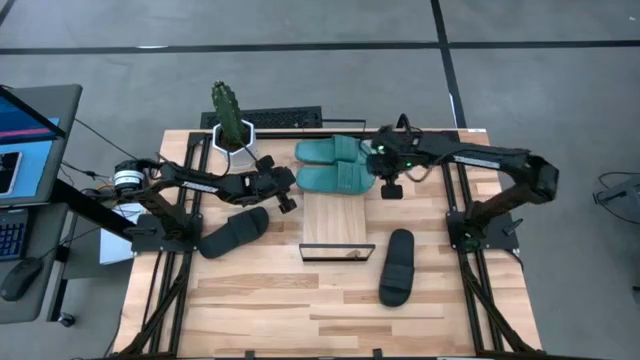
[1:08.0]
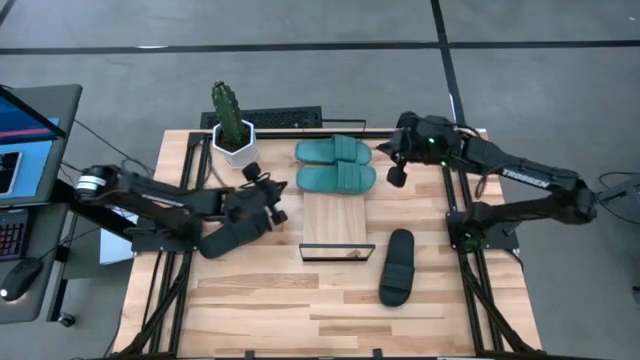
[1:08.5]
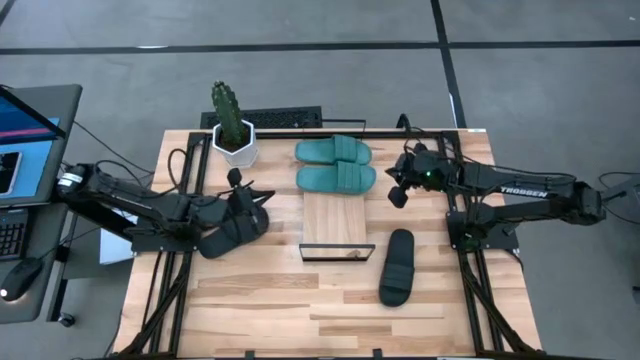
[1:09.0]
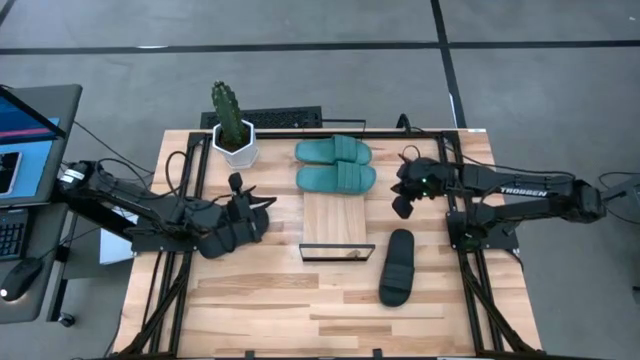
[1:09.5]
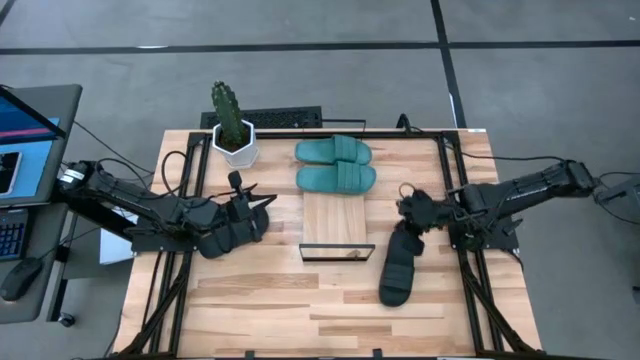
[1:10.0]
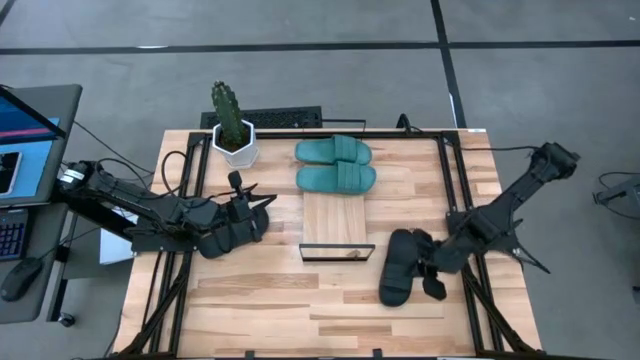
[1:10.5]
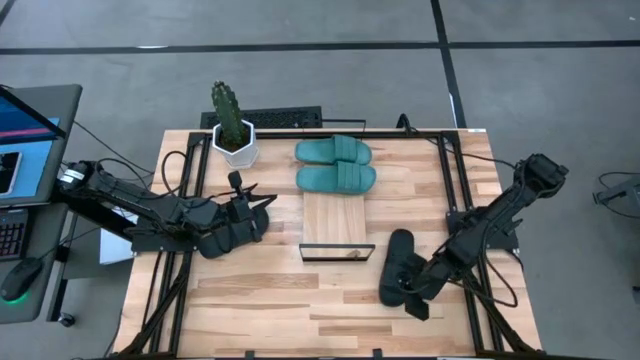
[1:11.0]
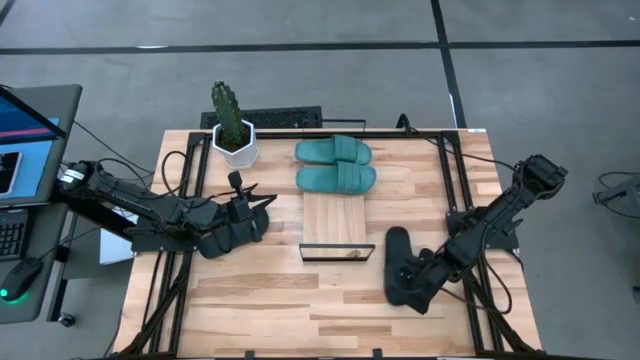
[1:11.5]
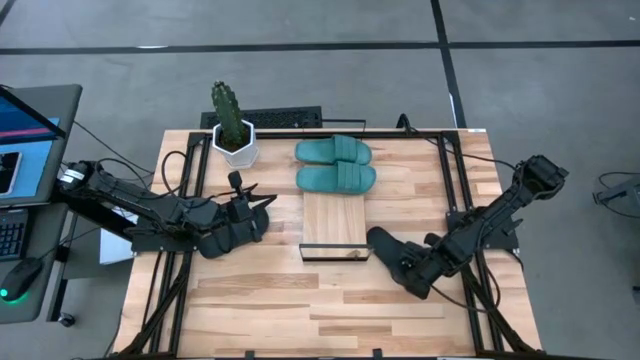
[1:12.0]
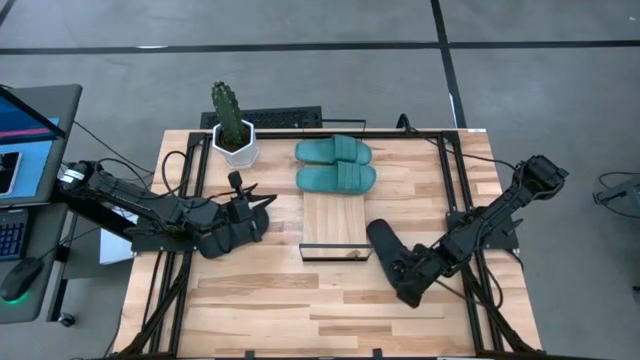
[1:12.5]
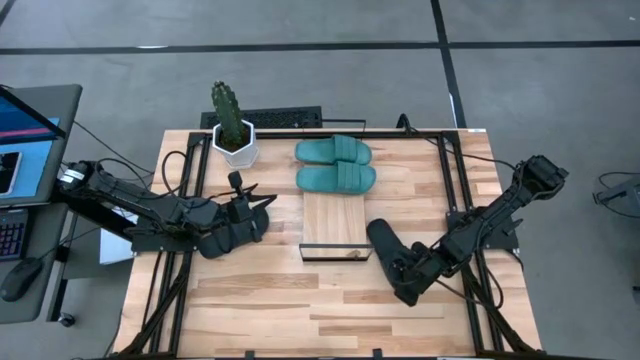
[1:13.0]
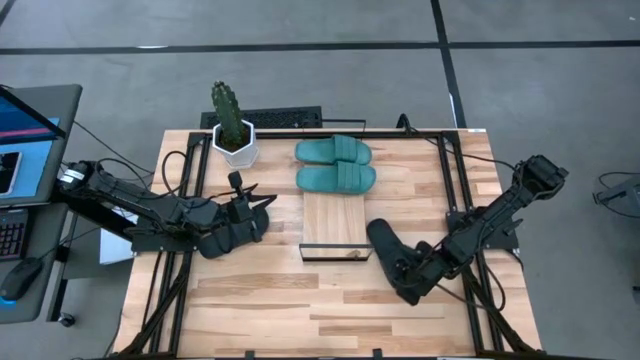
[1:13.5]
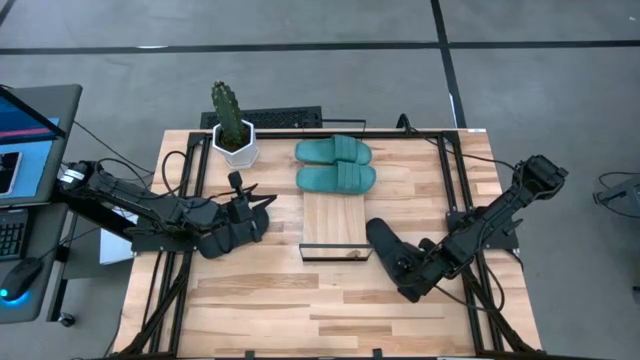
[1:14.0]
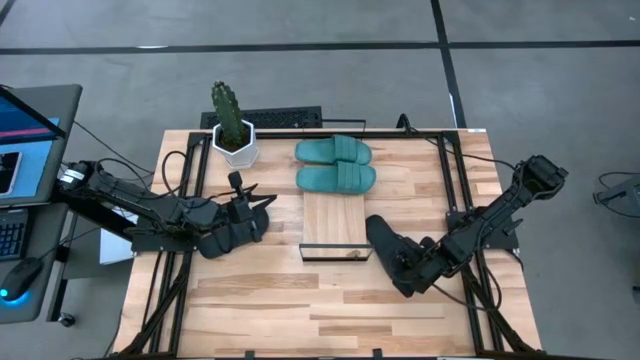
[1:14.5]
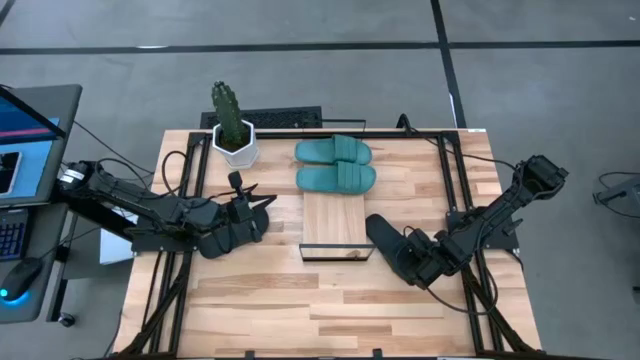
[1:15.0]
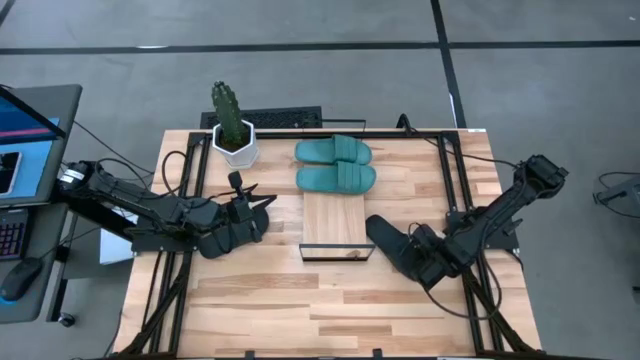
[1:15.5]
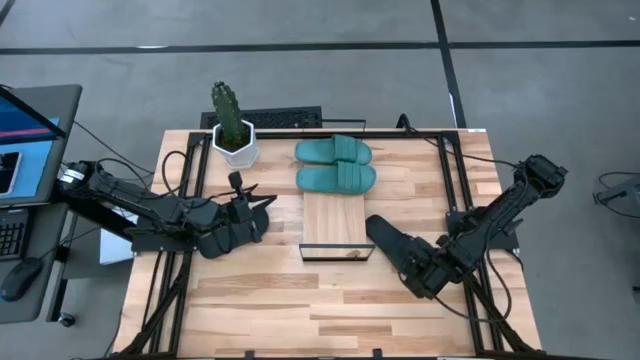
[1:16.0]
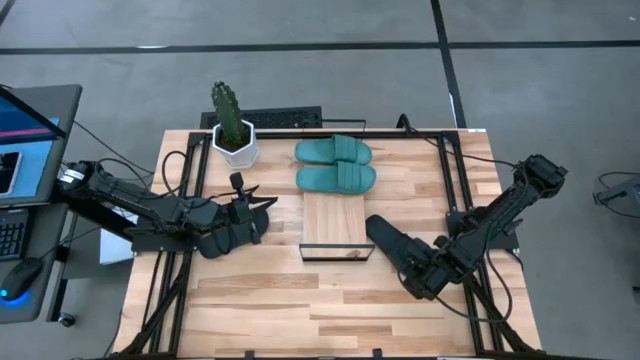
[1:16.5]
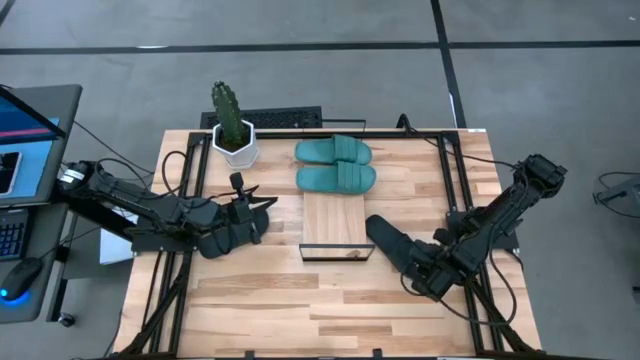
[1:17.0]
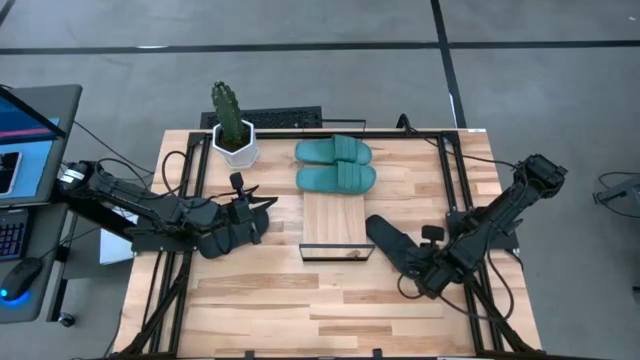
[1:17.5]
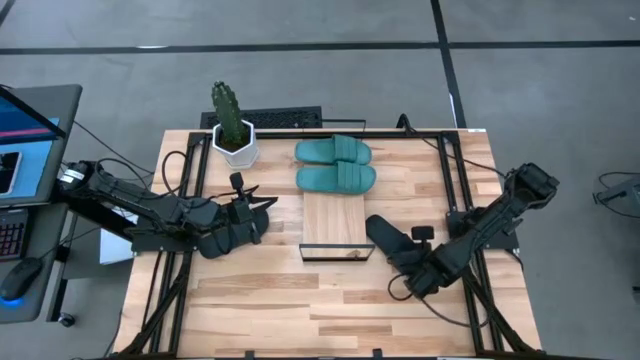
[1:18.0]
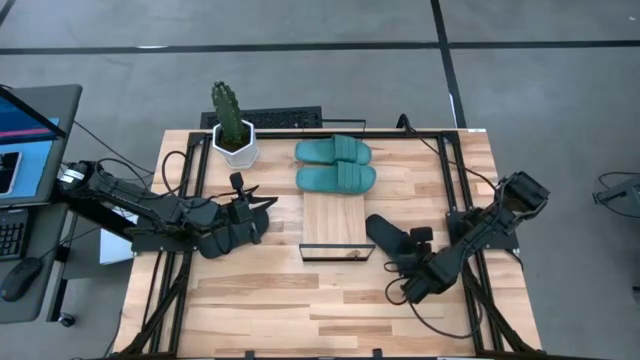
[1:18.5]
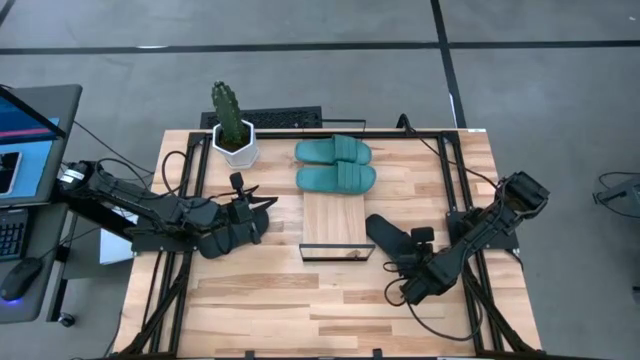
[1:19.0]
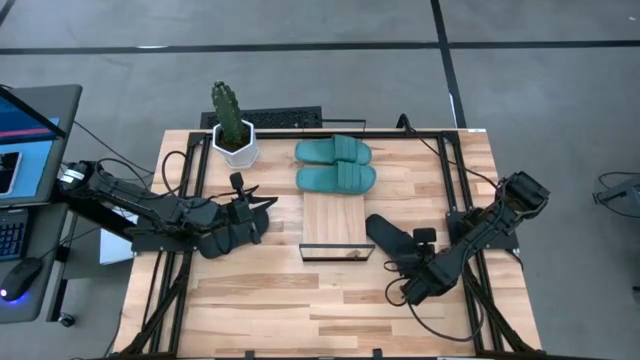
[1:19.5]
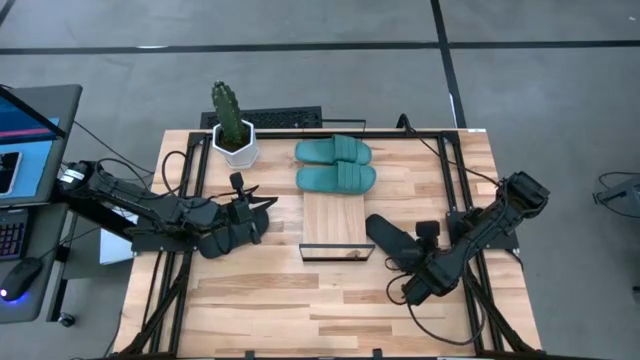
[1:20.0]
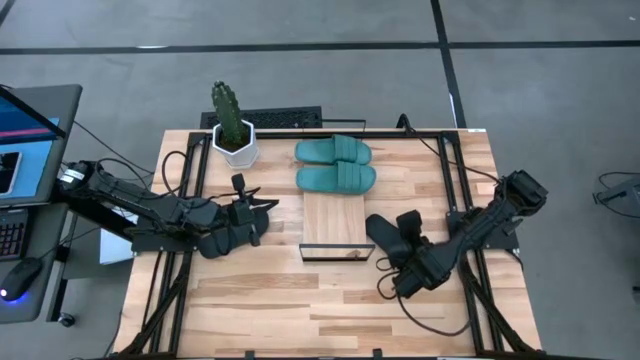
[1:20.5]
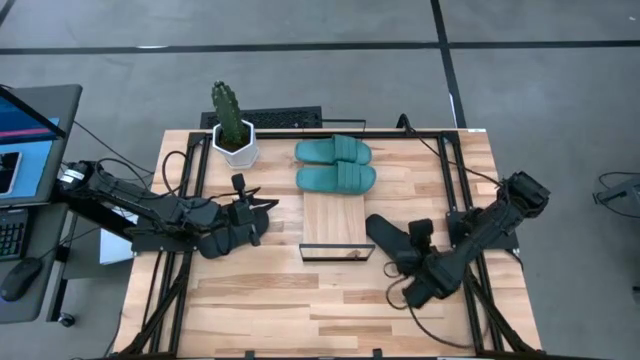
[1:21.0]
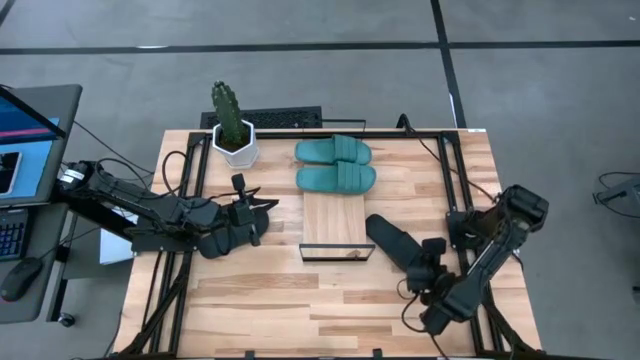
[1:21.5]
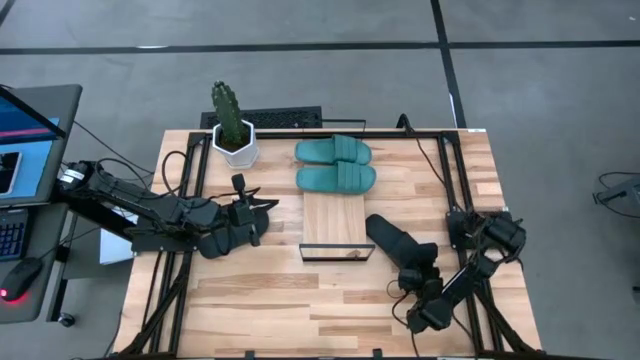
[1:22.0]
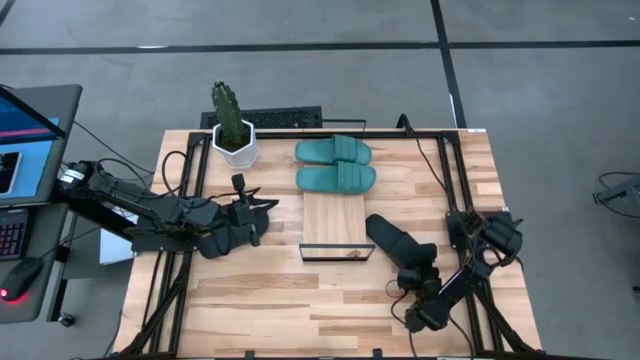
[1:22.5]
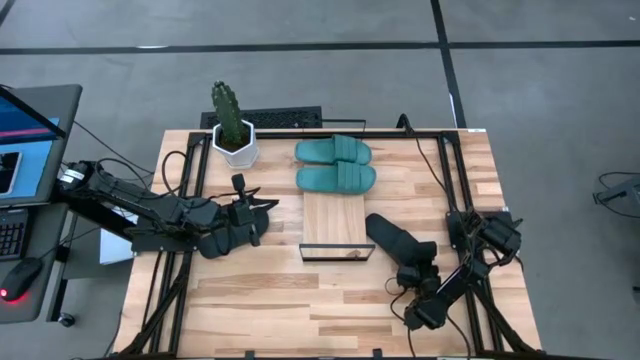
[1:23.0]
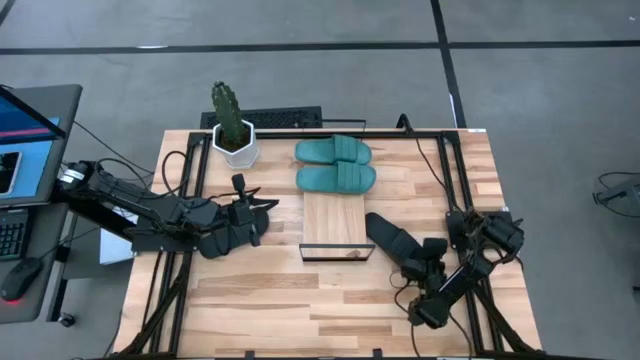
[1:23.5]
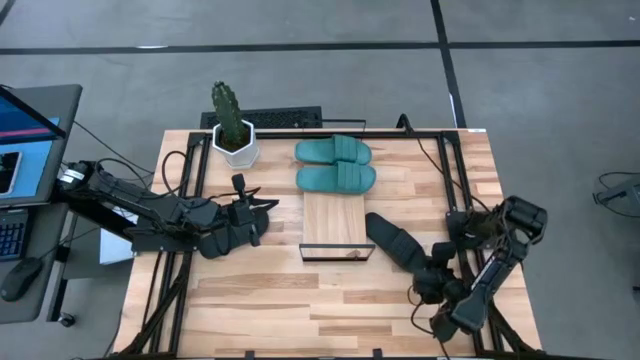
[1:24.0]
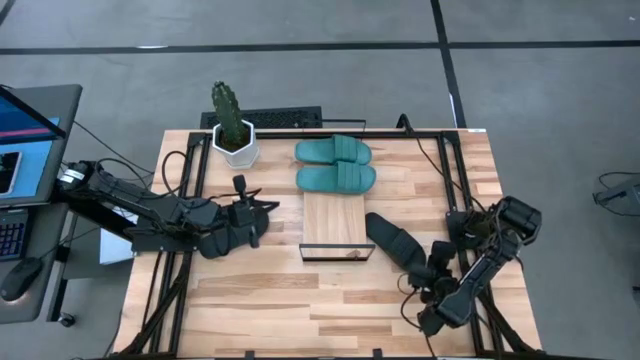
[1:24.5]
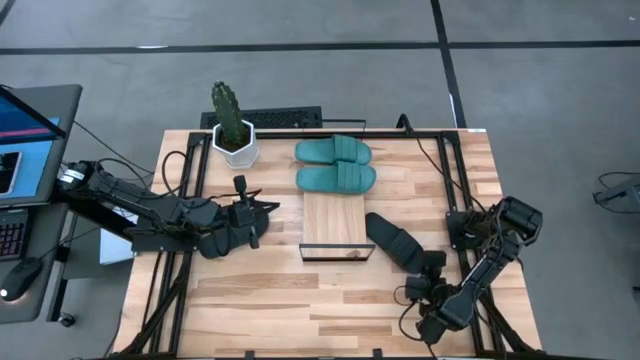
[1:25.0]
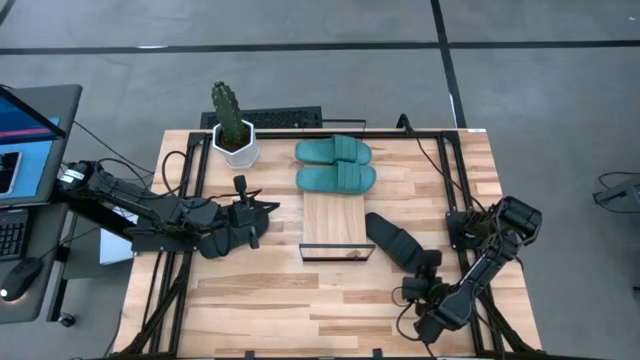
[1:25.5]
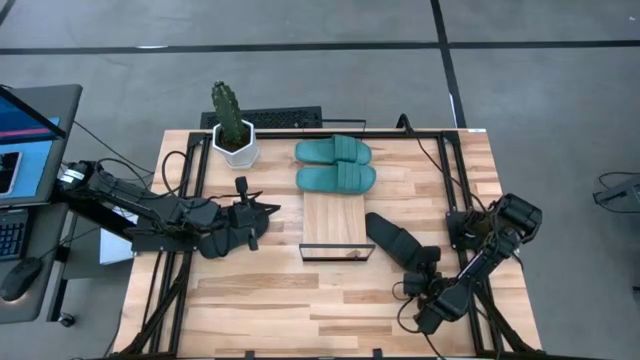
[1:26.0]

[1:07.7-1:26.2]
Task: Pick and place slides into the shelf
Put the right black slide on the shelf
